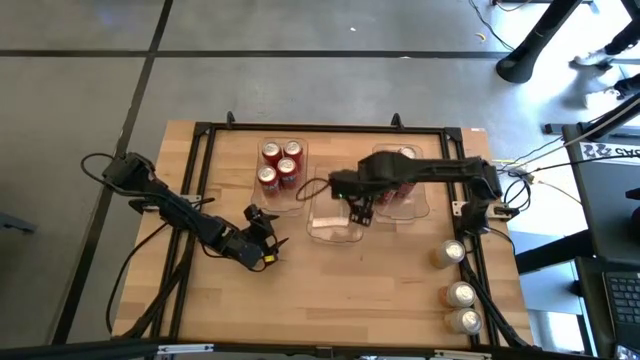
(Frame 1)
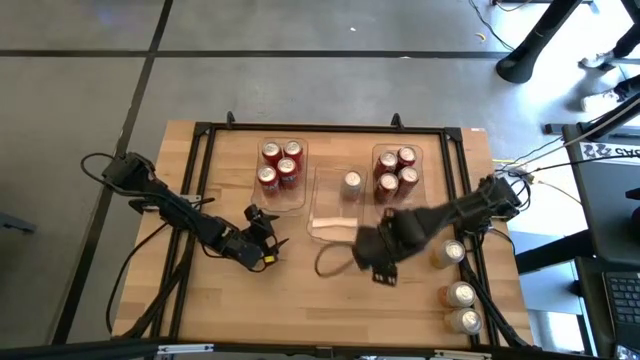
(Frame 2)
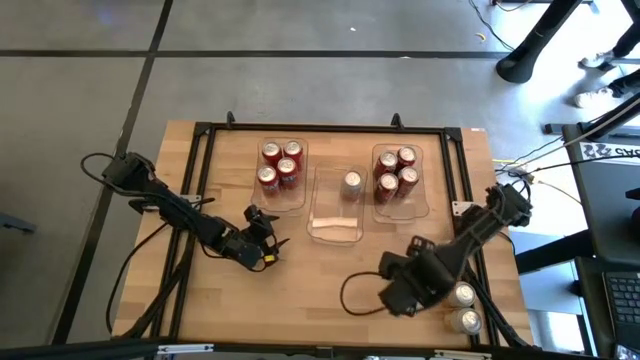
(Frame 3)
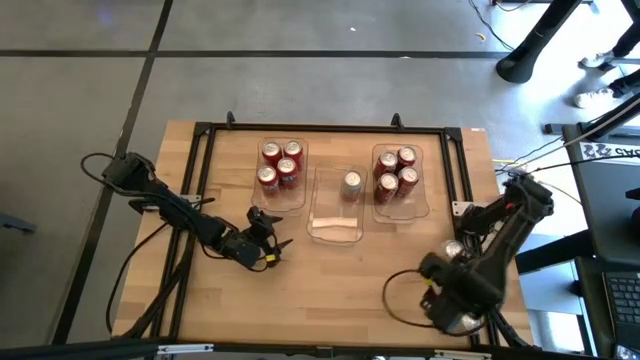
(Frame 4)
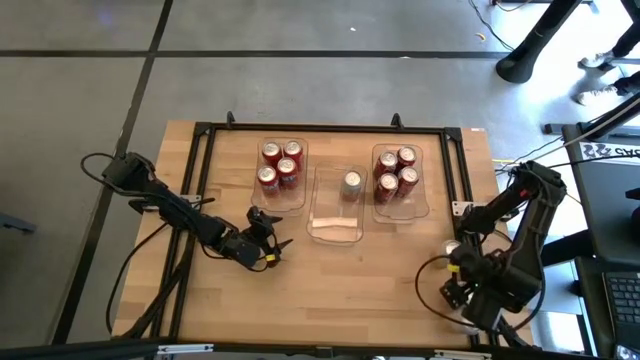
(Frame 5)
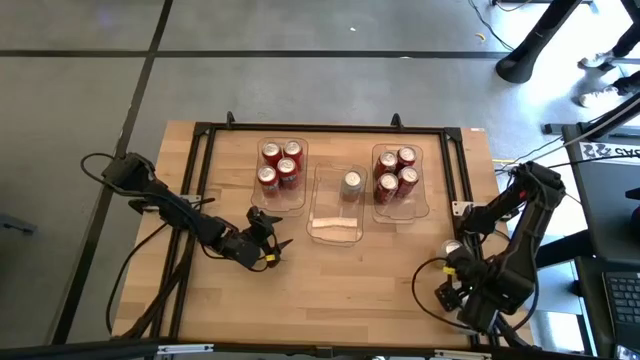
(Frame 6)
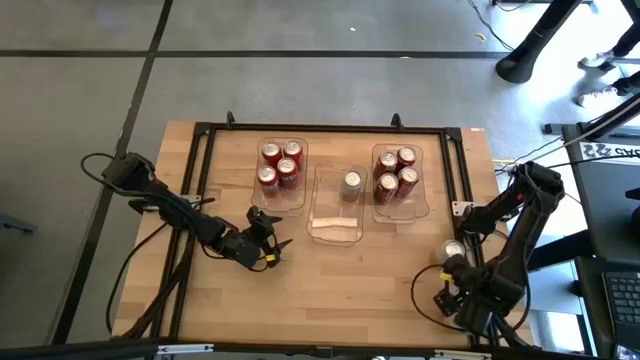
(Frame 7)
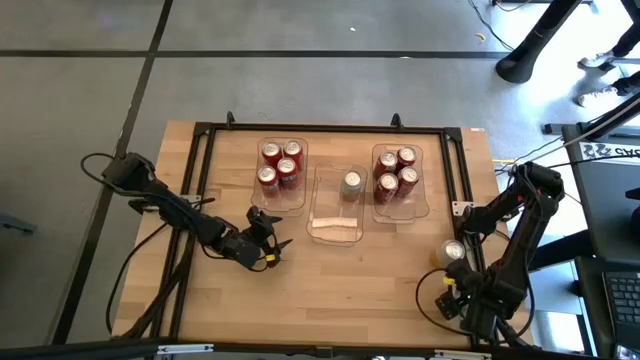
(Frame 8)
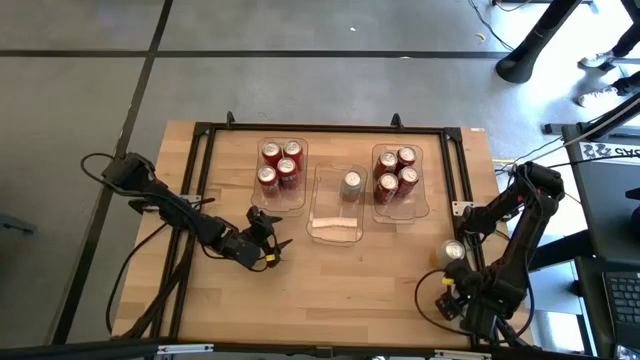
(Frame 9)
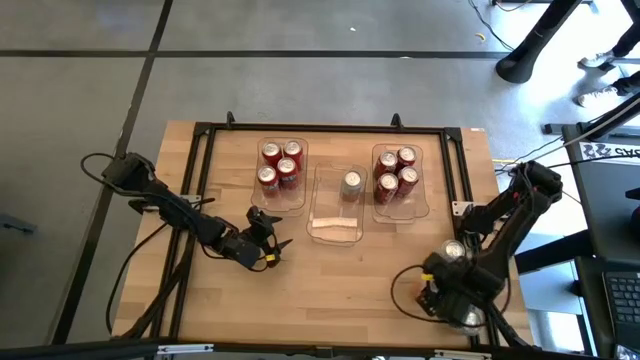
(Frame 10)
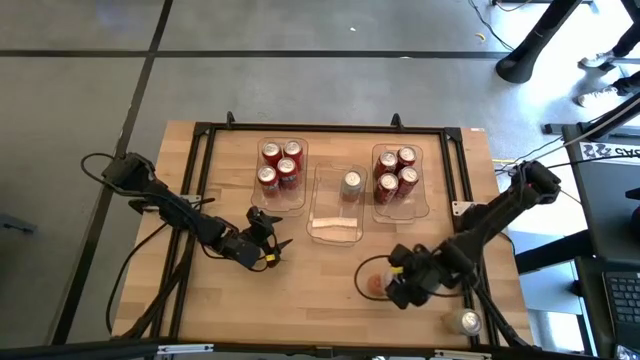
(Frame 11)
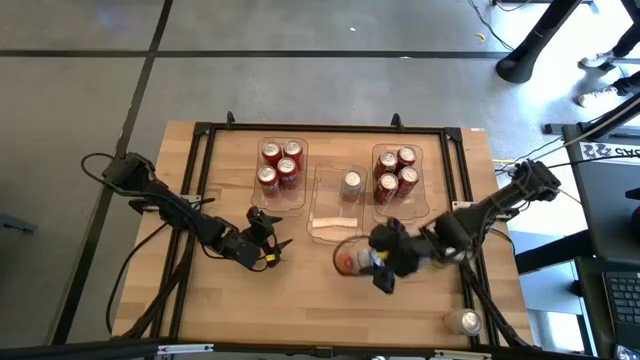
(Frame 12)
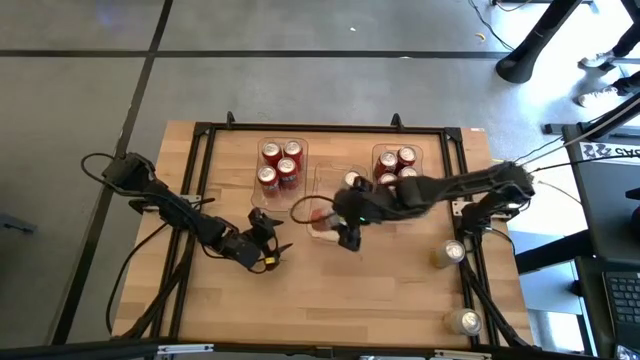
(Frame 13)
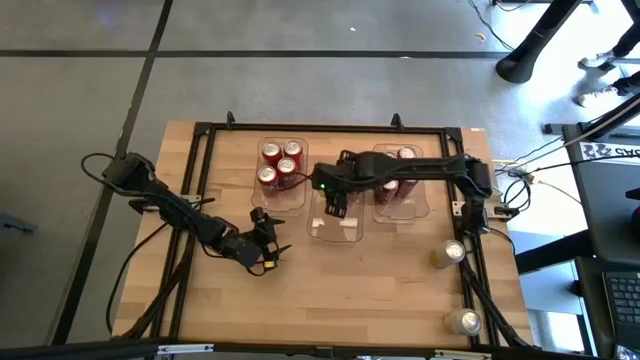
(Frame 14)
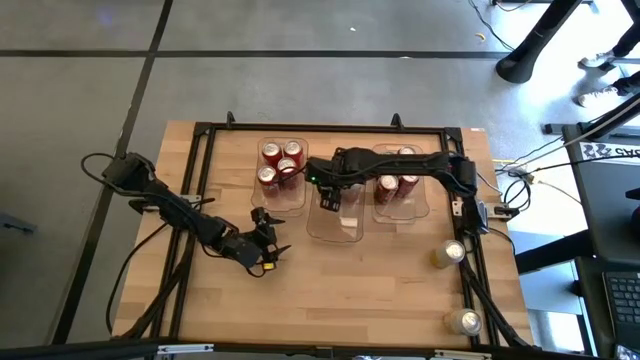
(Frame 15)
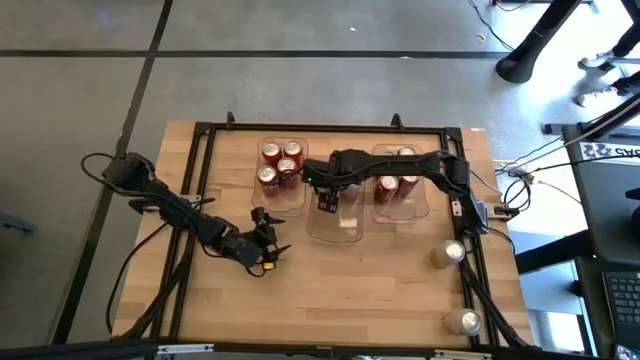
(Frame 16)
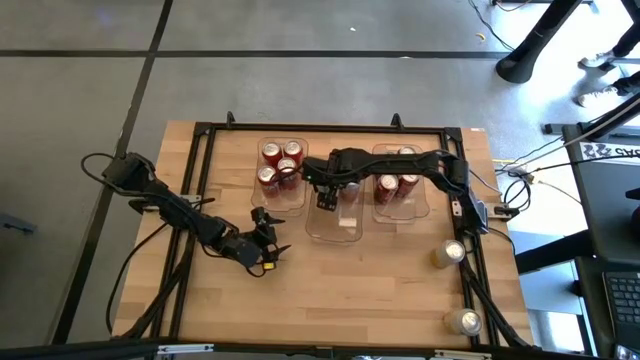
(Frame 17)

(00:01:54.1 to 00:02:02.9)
Task: Sort soda cans
Put the orange white soda can into the center transparent bin

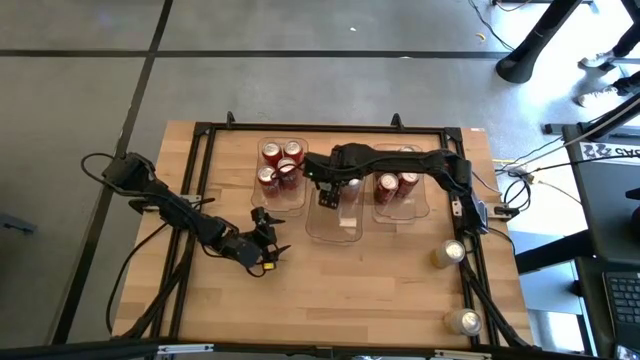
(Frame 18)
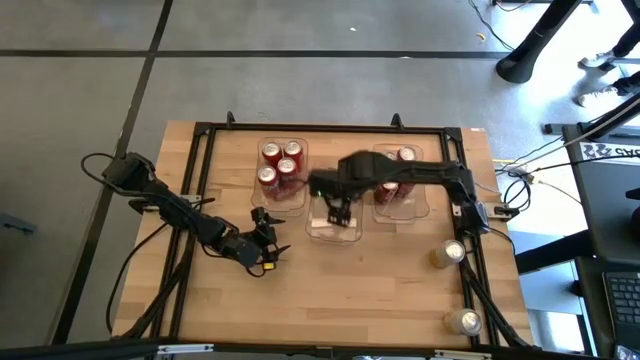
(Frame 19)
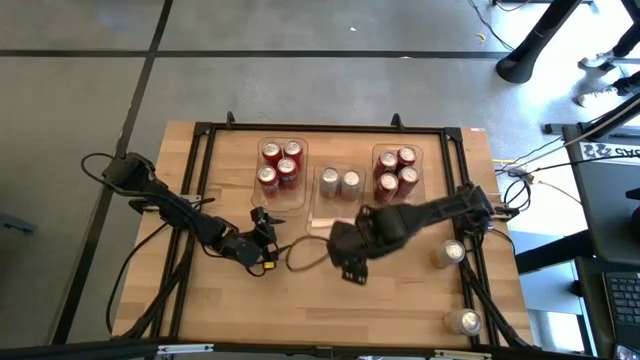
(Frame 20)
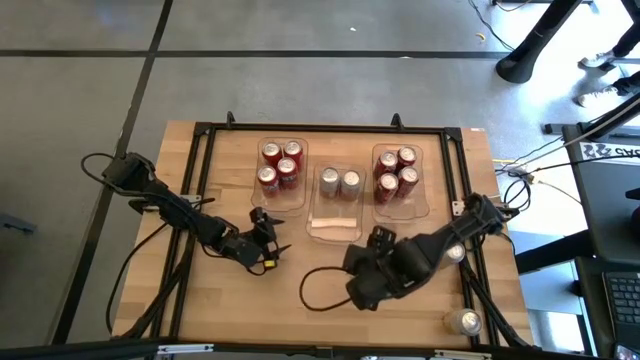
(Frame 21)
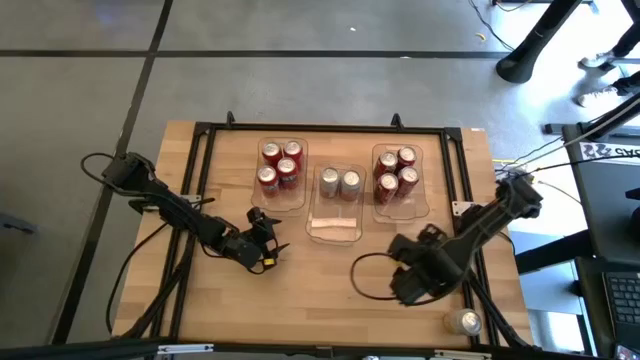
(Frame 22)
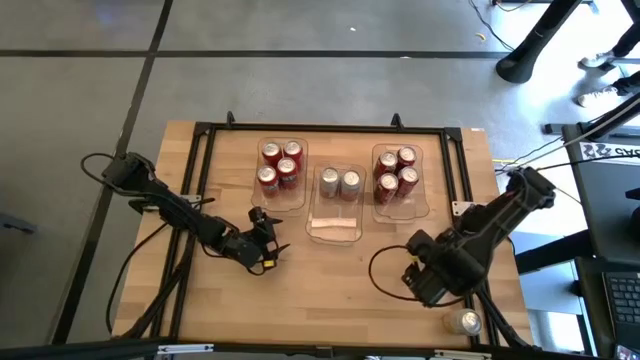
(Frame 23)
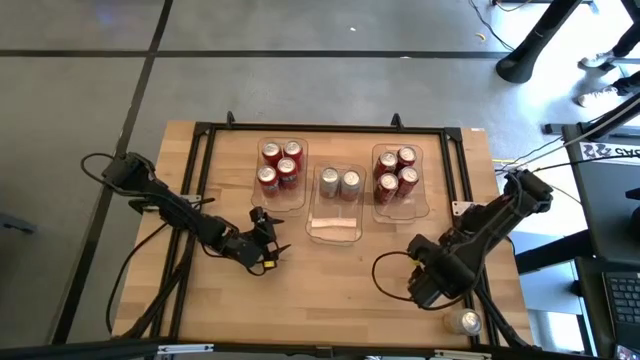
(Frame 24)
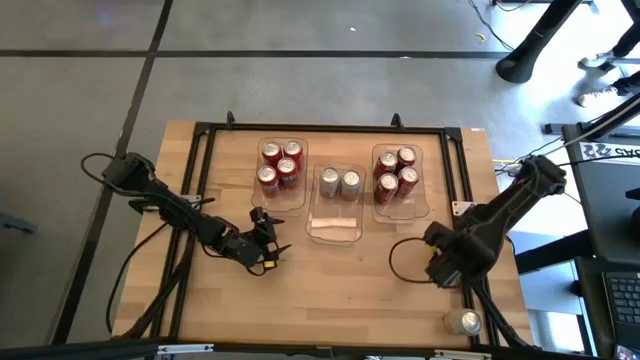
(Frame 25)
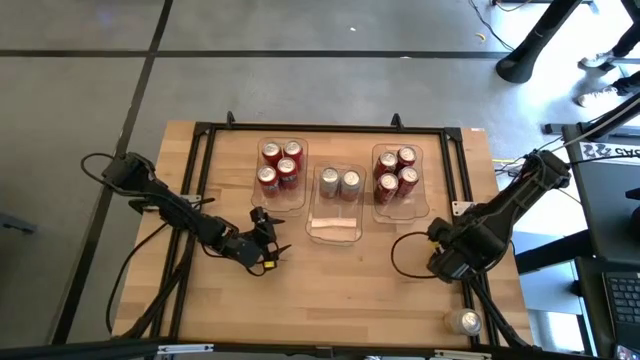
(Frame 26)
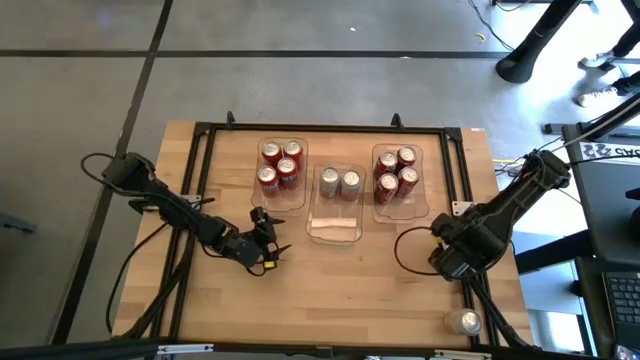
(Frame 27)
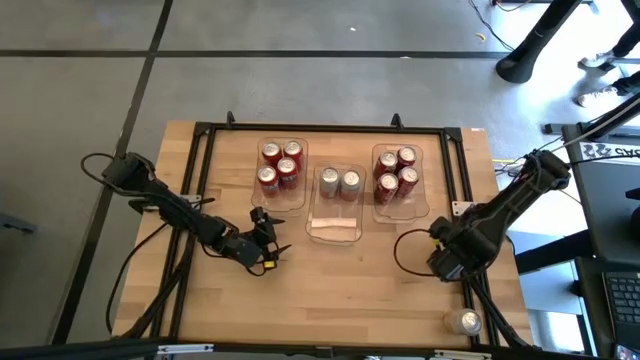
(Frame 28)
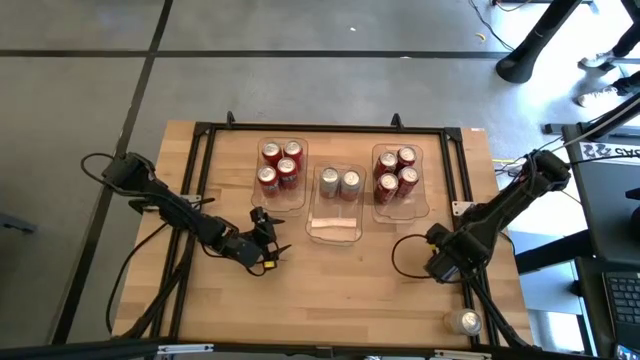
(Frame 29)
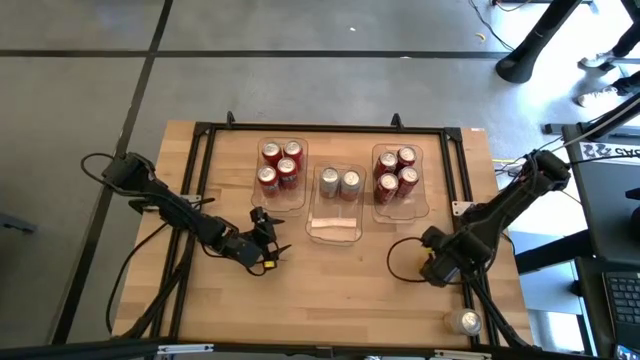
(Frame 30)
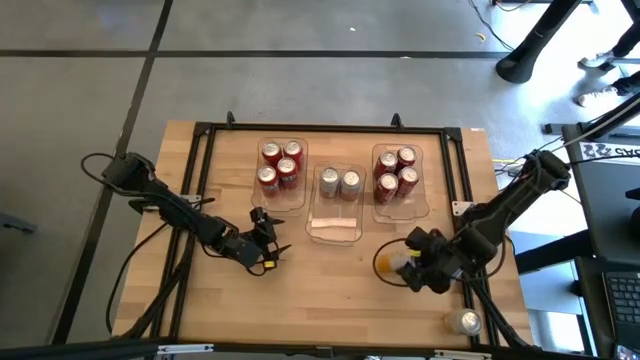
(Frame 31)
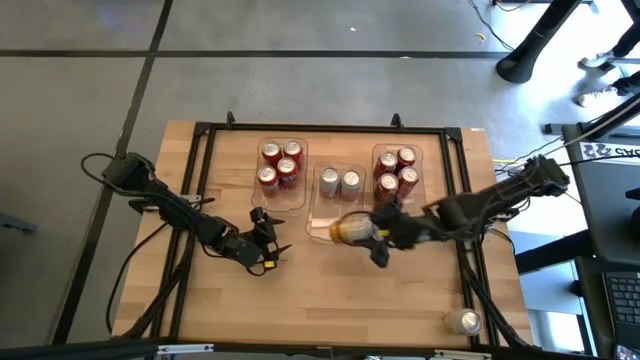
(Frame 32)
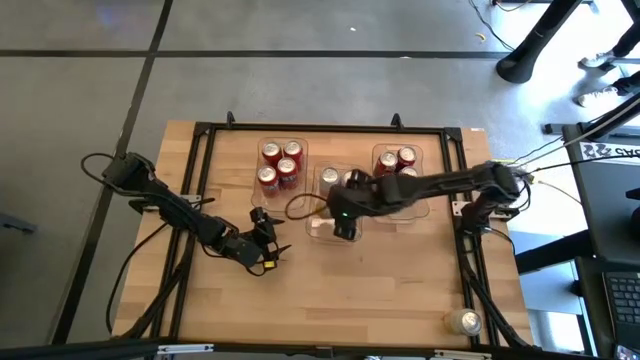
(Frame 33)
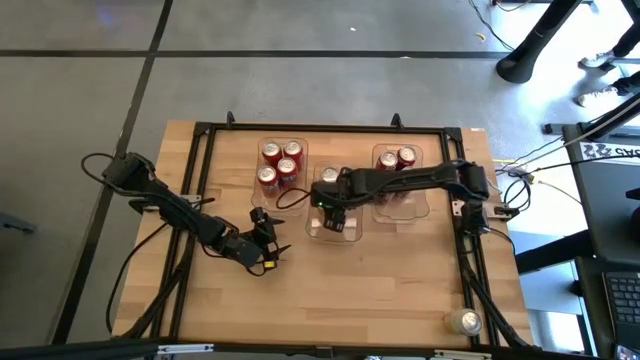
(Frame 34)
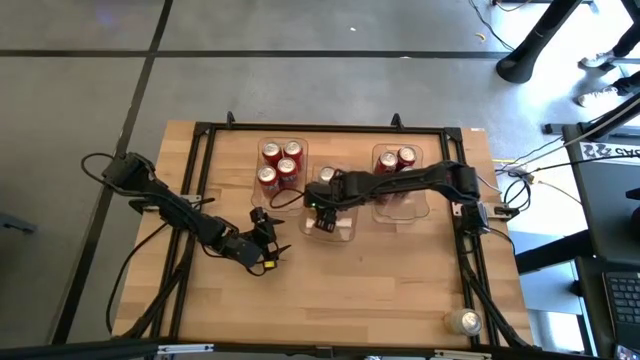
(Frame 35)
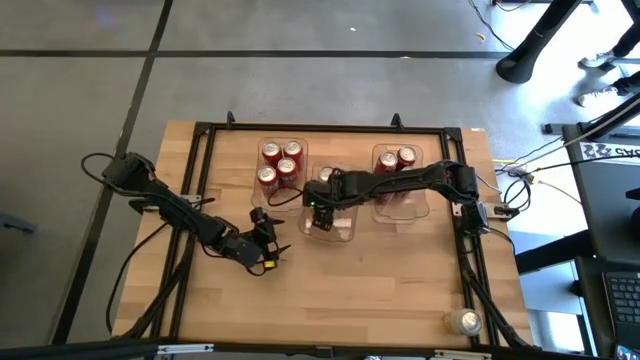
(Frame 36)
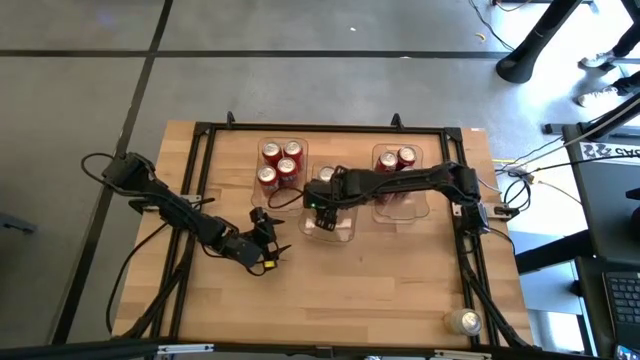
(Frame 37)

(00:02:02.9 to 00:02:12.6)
Put the yellow white soda can into the center transparent bin

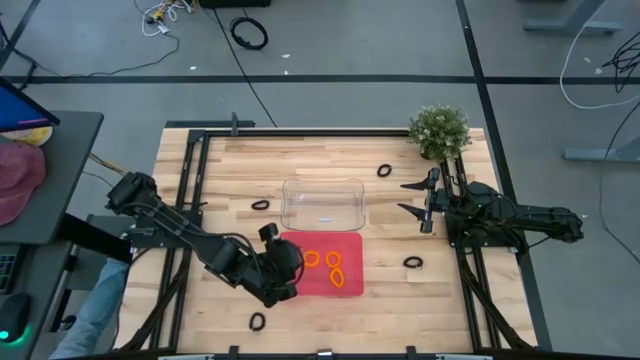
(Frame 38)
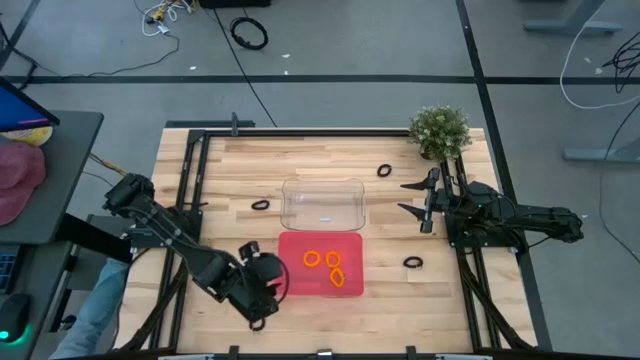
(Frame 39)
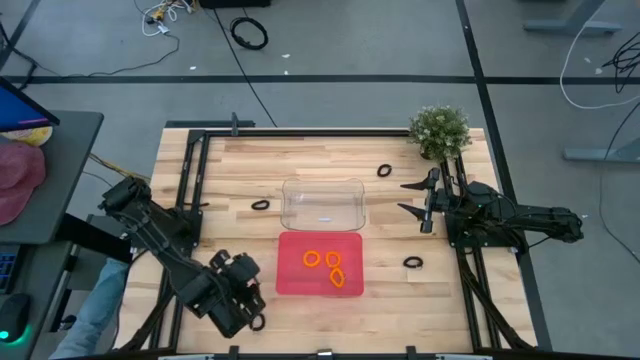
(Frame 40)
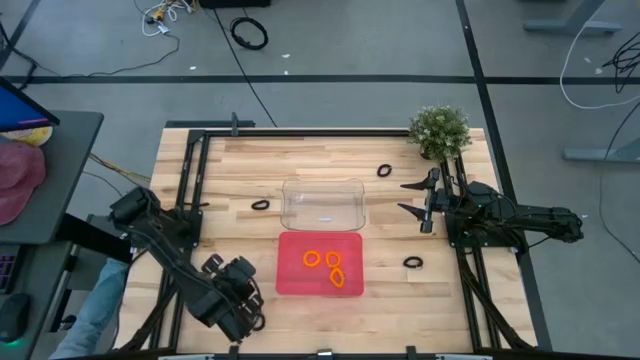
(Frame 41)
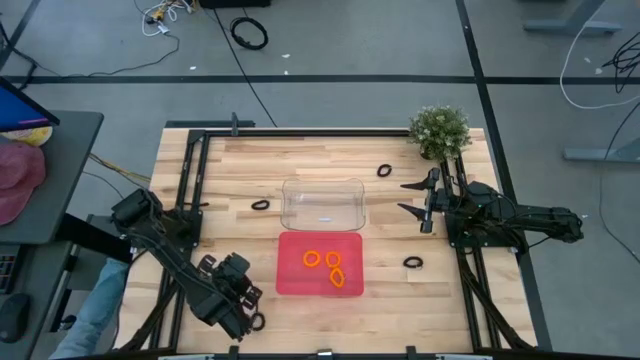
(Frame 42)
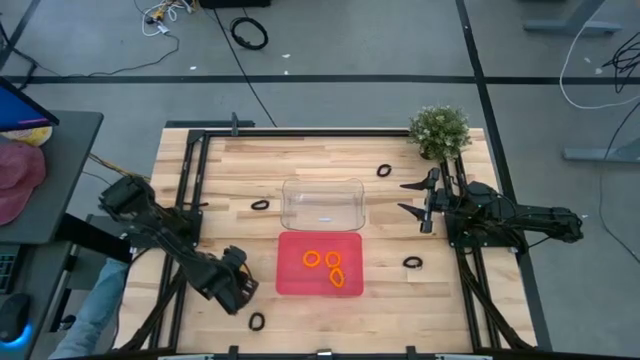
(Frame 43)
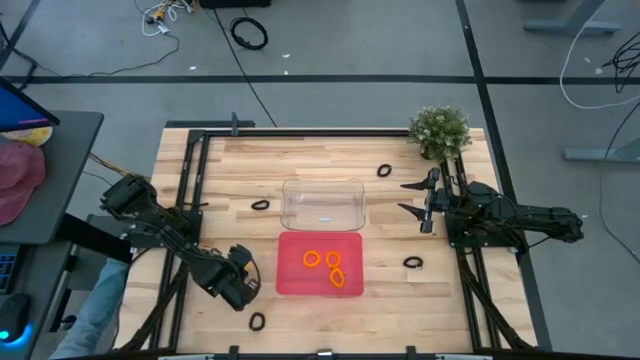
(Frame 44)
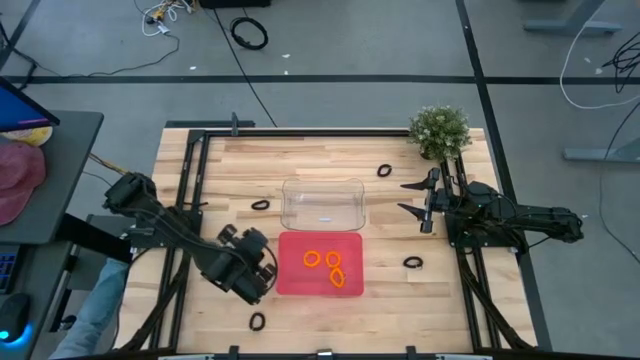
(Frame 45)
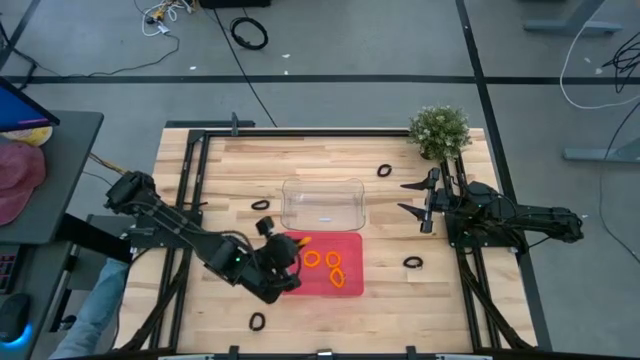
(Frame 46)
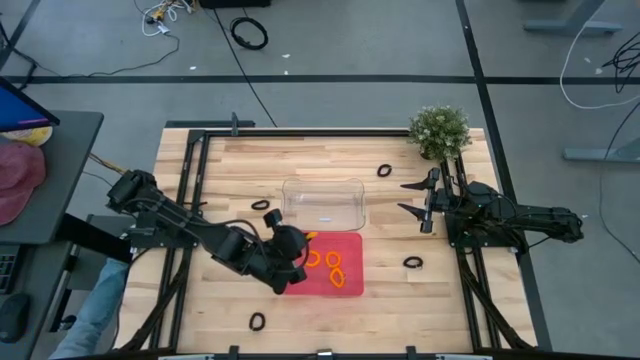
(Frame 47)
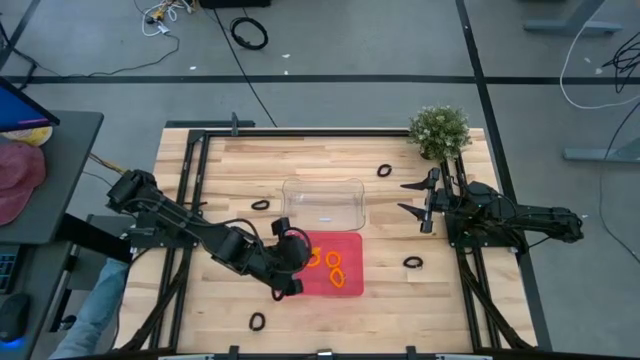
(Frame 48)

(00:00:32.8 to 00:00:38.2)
Task: Sort spring keychains
Put the orange spring keychain into the pink bin
